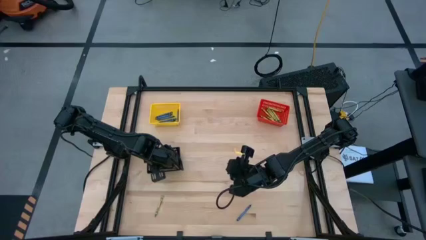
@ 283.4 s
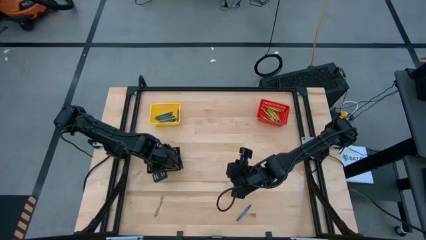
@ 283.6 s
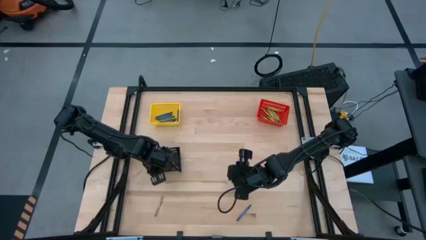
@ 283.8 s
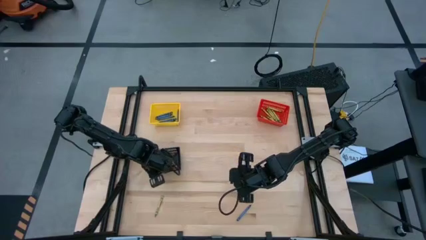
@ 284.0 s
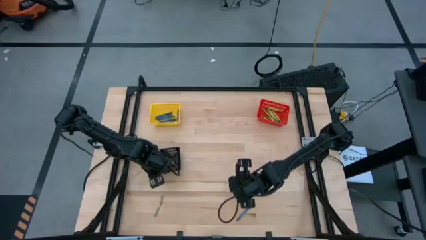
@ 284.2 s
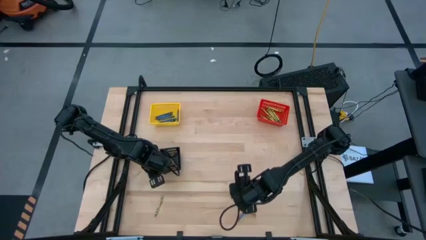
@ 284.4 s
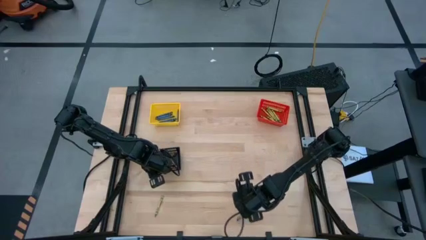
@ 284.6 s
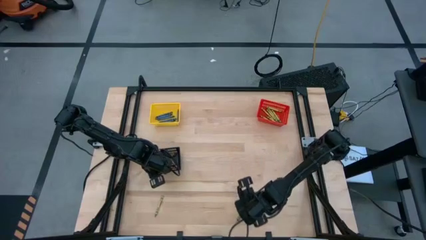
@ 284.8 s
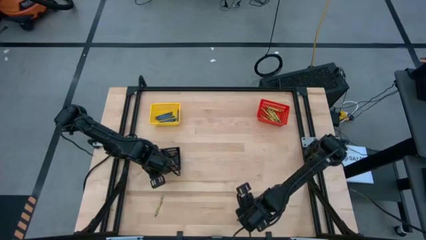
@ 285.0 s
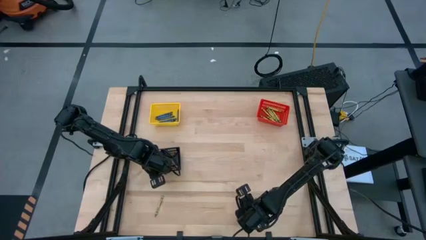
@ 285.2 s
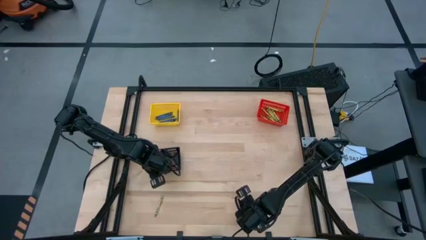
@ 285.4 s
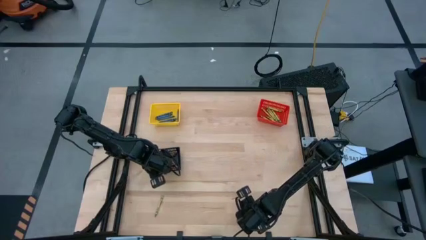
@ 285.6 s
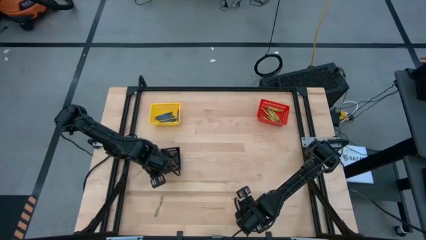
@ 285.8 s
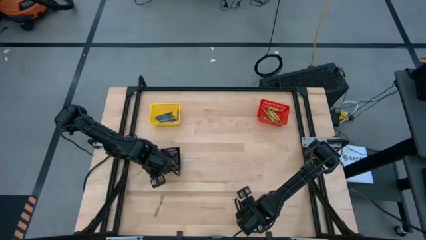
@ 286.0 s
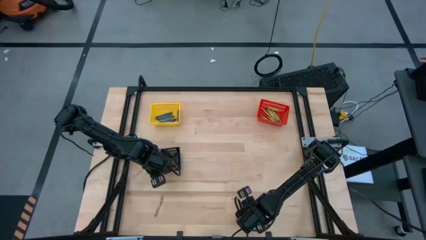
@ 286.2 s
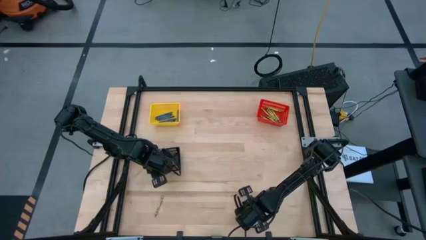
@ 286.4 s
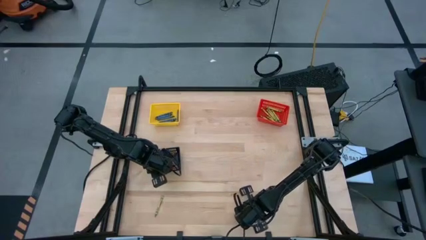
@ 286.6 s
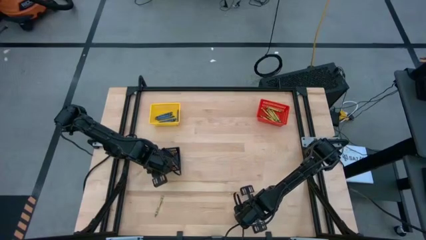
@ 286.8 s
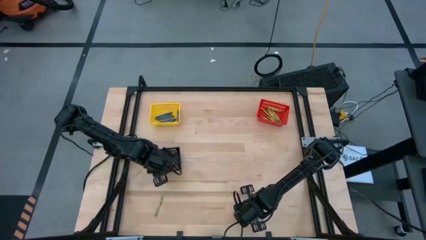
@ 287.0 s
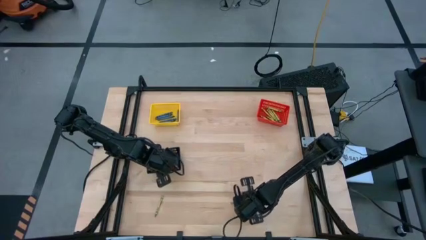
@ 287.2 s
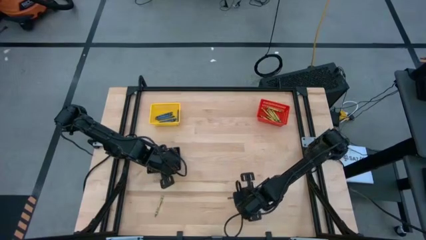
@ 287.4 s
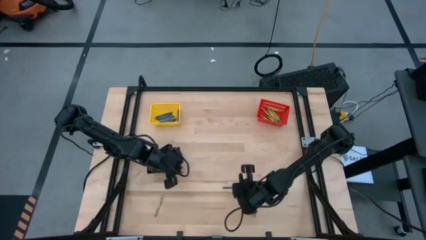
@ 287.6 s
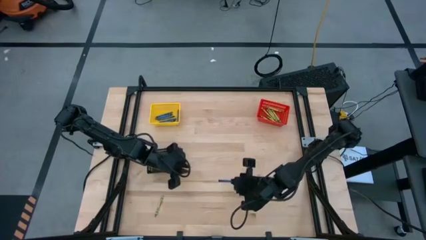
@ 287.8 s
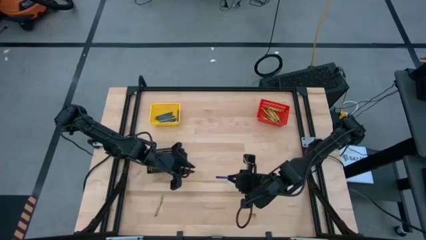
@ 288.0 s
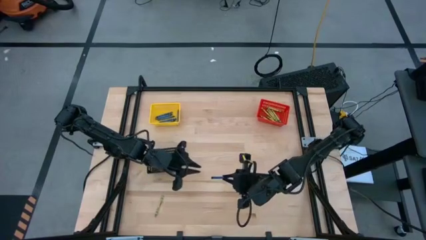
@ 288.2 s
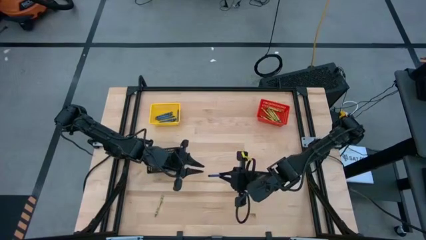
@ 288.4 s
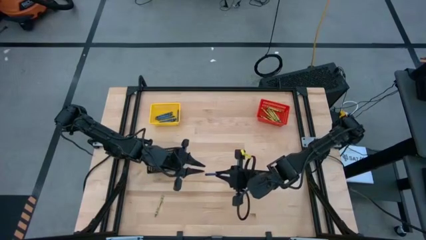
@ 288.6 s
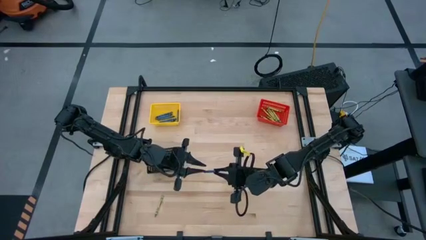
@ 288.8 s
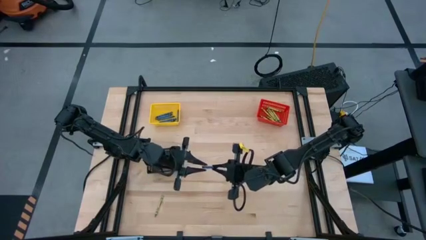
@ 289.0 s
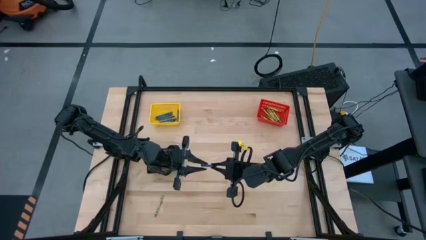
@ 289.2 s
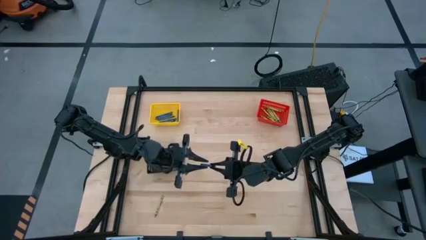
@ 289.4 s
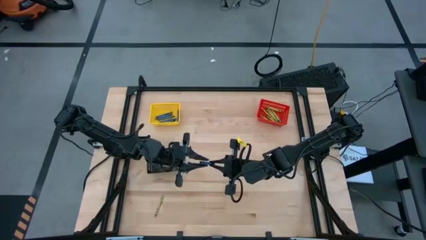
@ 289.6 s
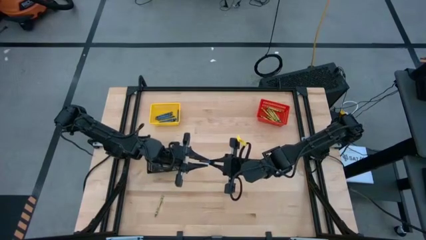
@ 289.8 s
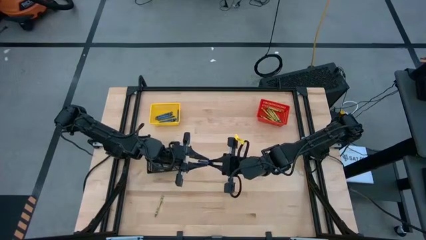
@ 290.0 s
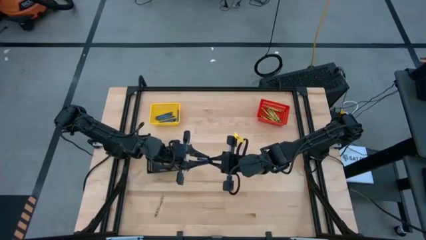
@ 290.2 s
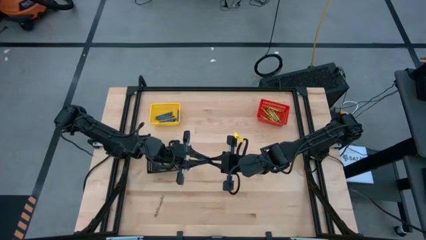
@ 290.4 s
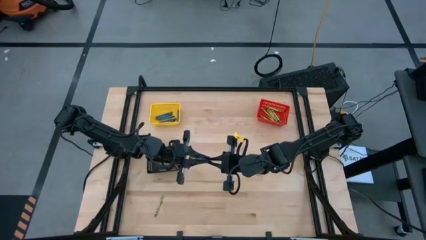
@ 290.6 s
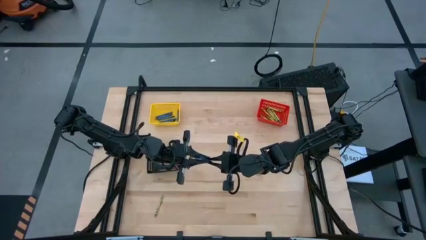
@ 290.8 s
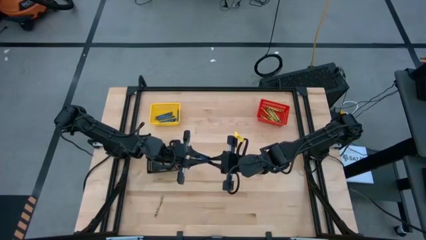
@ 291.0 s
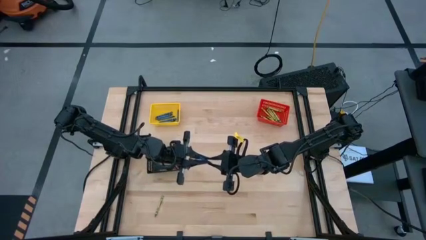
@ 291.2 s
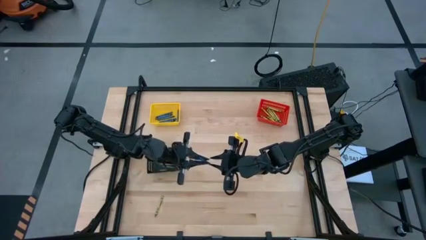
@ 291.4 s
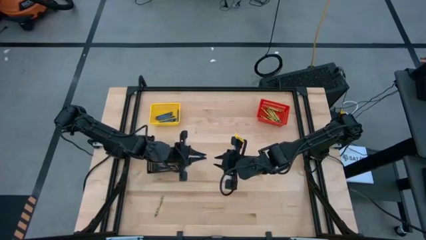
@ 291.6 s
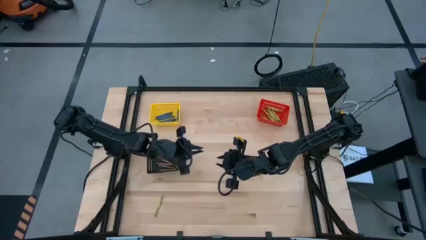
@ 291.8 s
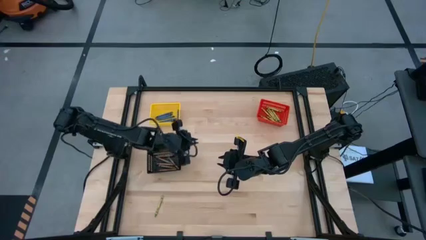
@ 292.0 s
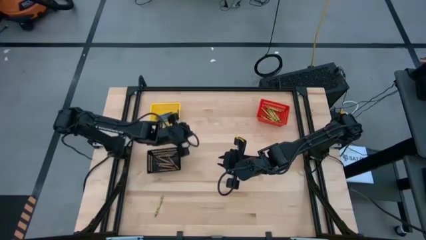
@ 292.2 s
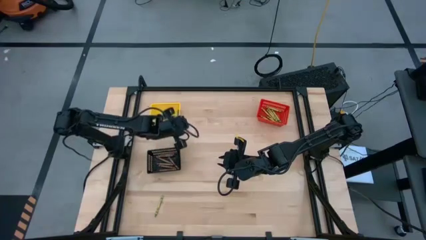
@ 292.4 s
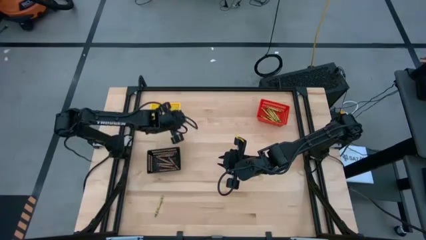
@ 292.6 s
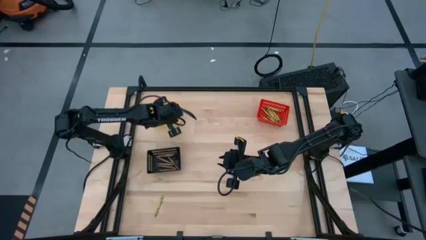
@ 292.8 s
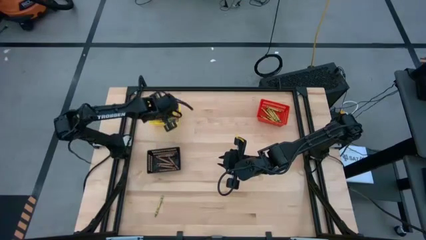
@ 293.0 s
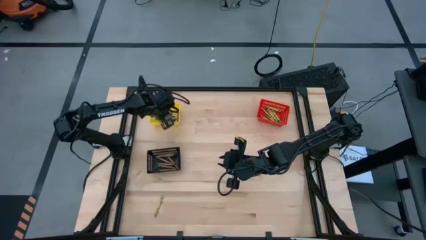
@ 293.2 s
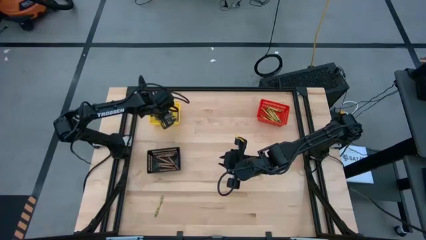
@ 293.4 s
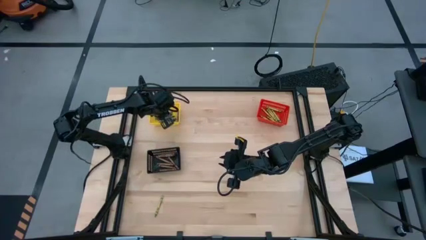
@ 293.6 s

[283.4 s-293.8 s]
Task: Sort crayons
Put the blue crayon into the yellow bin
